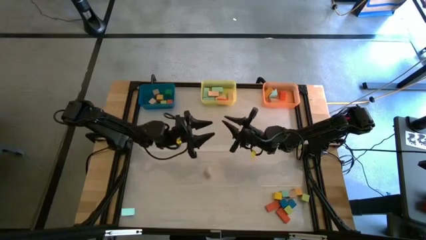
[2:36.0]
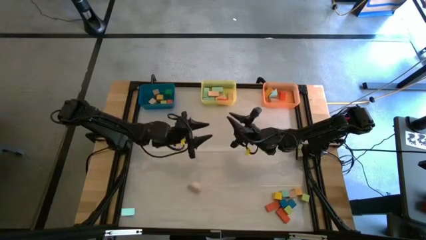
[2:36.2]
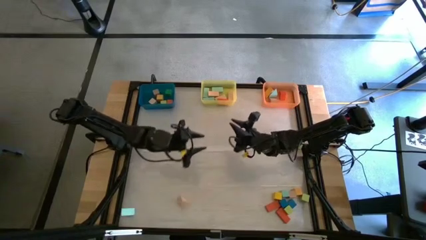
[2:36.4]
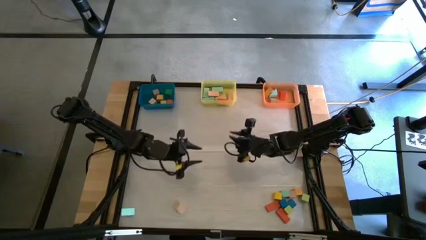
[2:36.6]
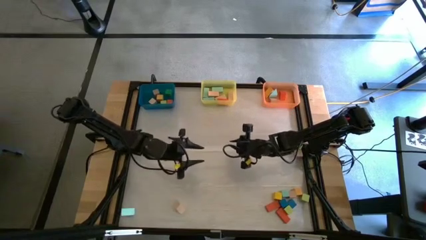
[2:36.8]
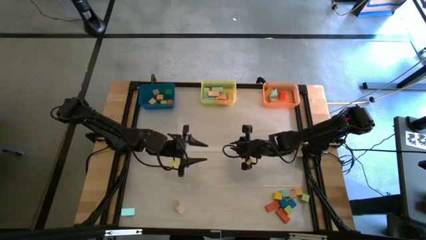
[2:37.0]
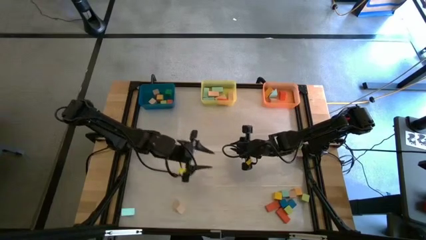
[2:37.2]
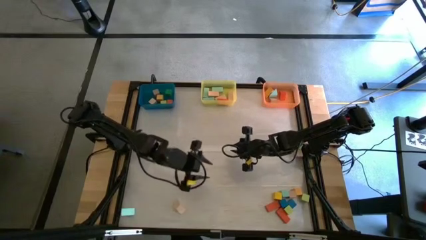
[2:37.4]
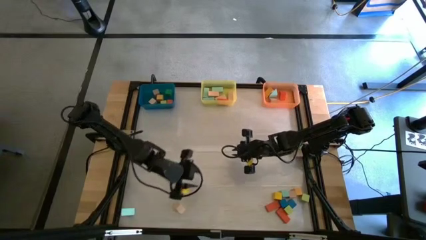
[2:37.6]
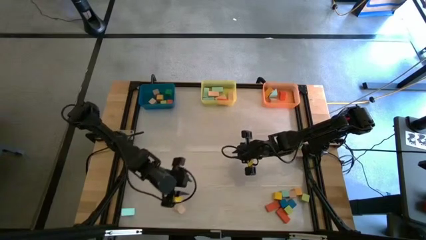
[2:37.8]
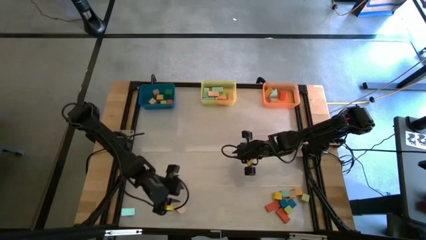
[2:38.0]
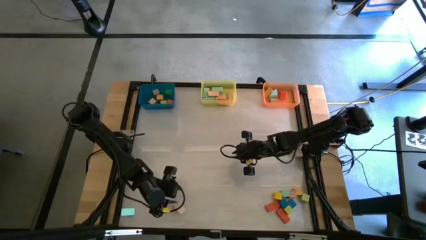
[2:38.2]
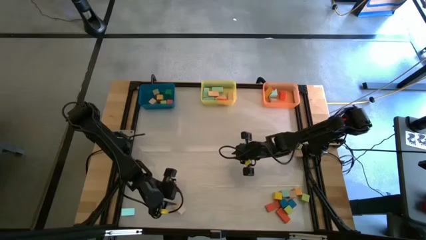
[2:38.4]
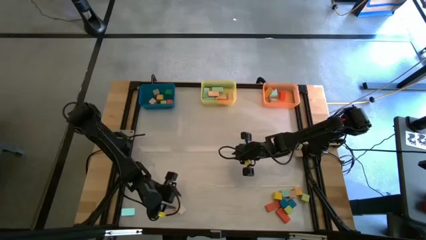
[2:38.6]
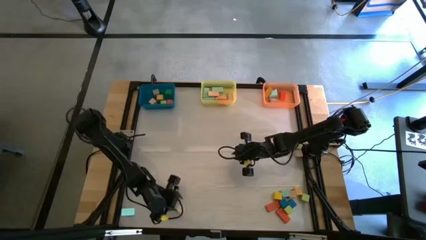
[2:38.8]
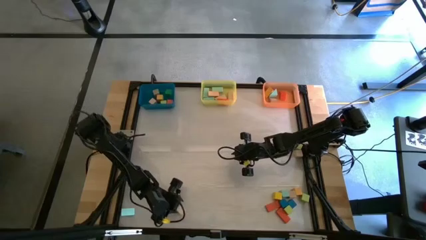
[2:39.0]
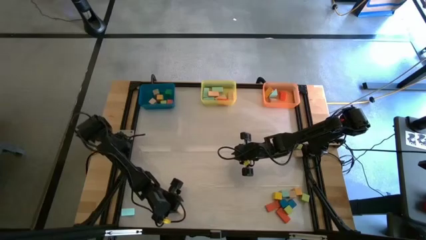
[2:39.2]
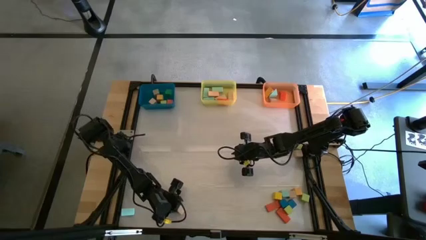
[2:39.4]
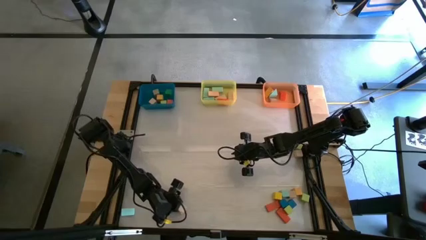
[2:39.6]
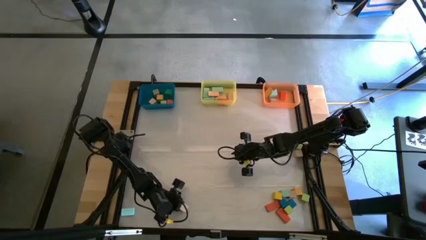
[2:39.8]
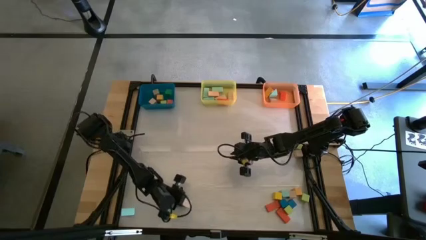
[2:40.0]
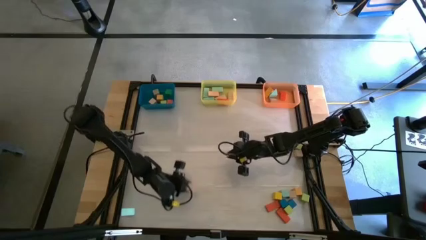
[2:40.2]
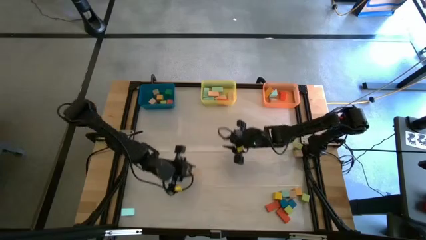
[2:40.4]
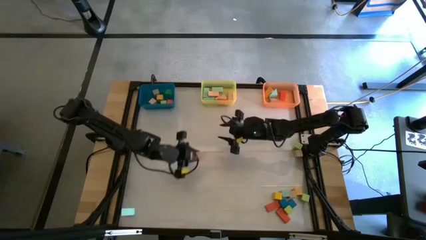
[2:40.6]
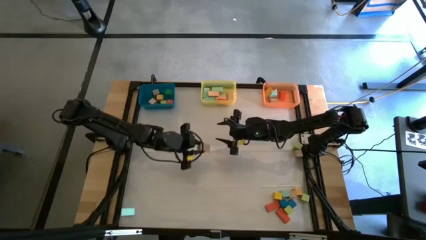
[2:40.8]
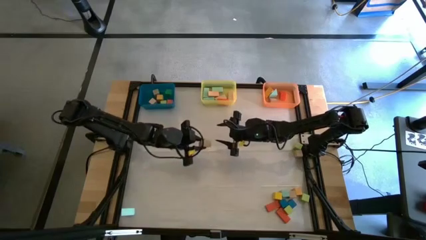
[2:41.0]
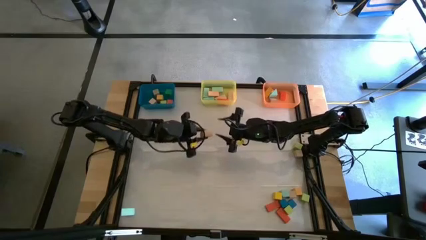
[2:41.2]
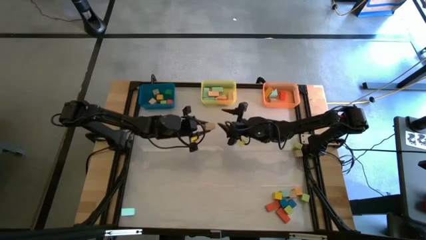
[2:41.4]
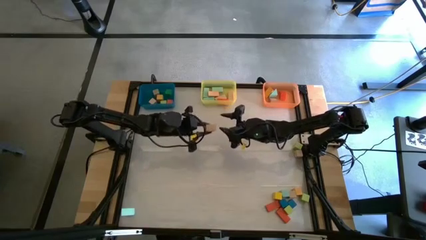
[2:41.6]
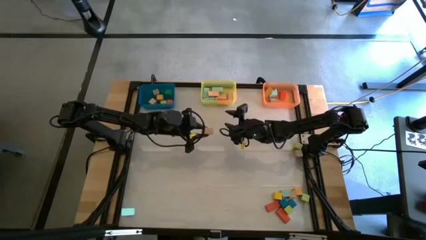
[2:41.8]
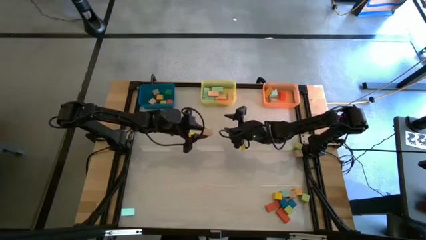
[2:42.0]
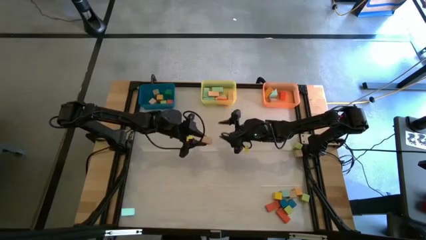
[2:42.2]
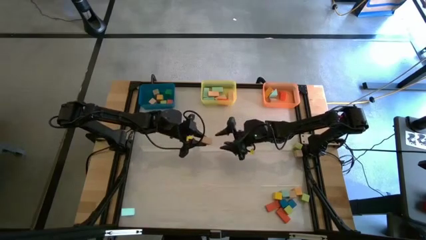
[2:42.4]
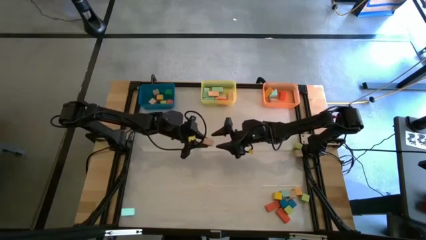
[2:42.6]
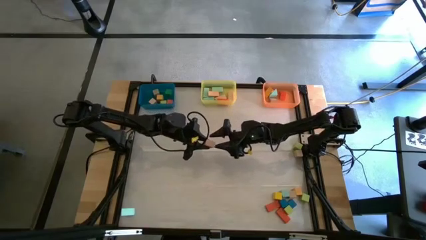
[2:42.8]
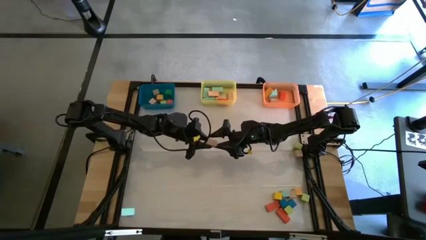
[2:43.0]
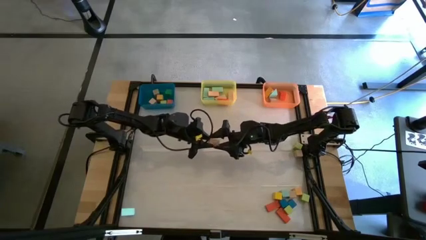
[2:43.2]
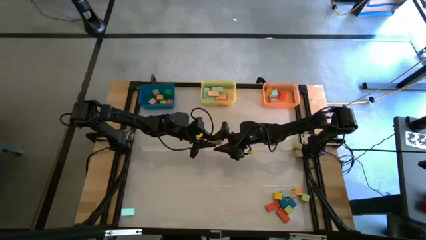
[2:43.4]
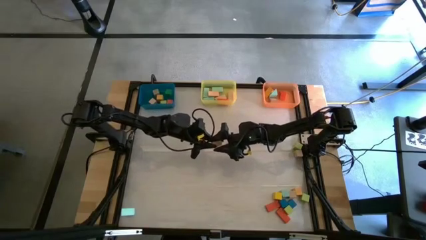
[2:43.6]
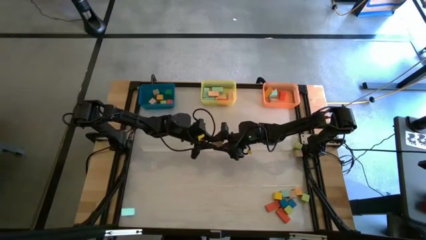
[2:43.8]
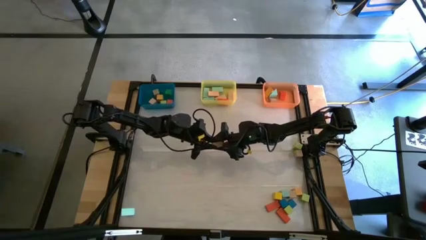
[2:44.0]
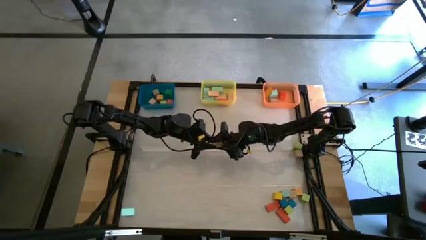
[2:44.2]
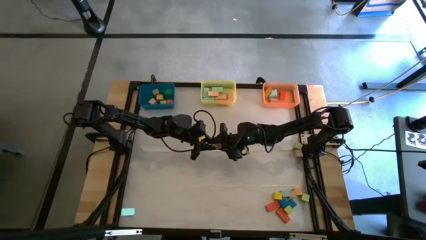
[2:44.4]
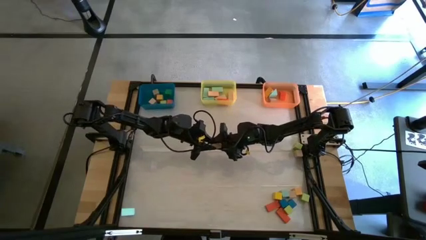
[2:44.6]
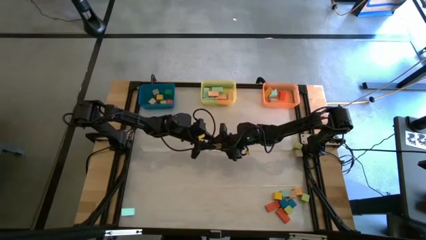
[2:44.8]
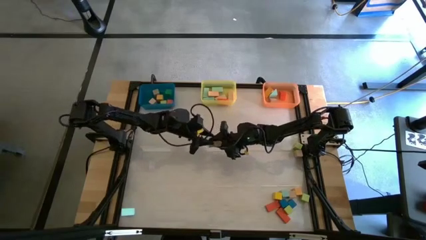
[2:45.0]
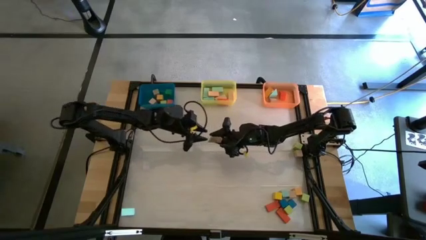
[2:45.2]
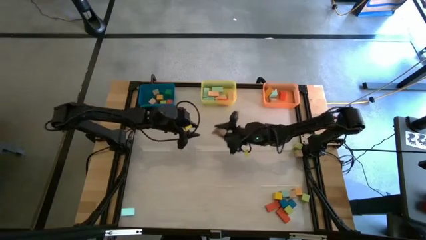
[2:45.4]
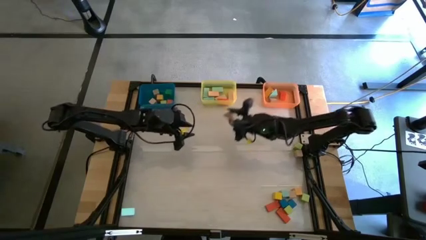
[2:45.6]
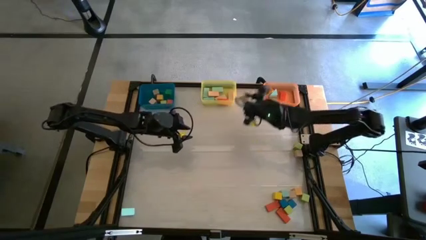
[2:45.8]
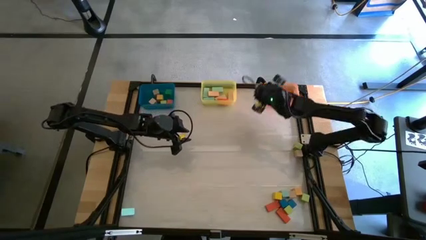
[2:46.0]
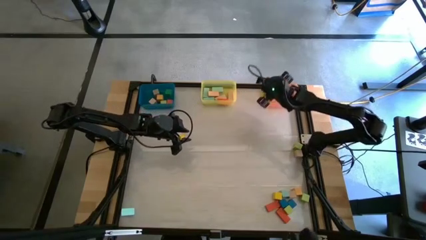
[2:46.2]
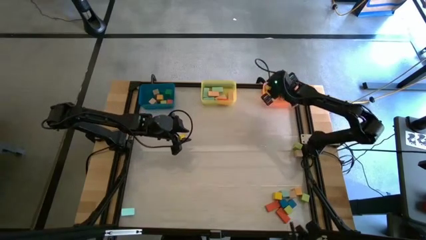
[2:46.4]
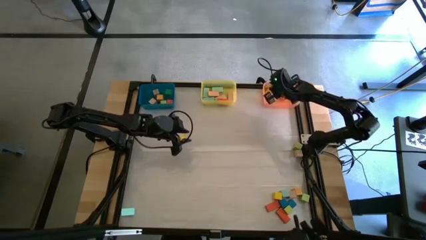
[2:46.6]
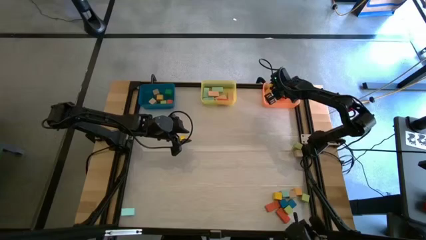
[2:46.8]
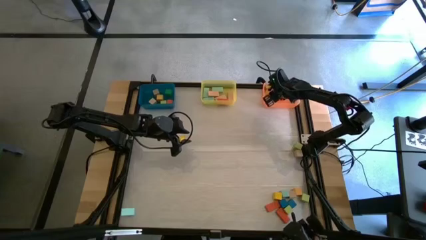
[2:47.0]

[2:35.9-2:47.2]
Task: Sort blocks by size
Put the brown triangle block into the orange bin

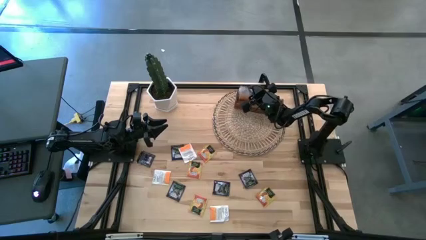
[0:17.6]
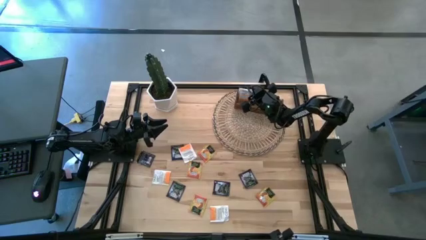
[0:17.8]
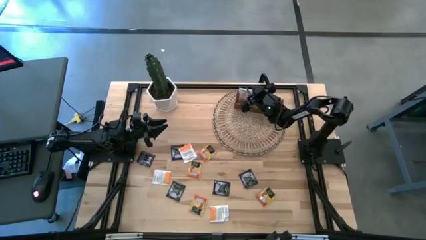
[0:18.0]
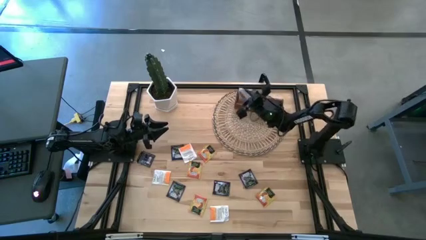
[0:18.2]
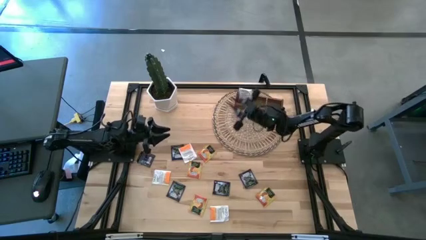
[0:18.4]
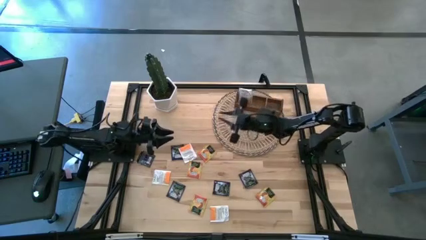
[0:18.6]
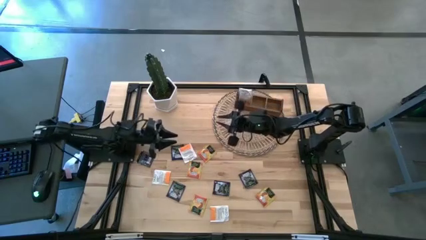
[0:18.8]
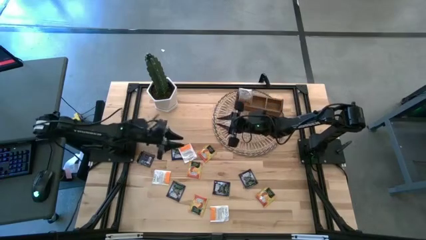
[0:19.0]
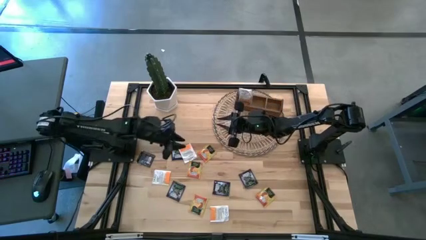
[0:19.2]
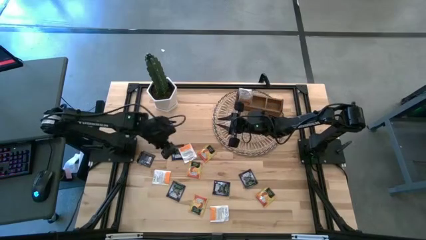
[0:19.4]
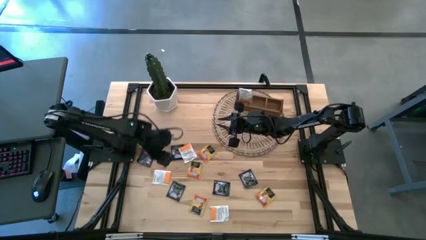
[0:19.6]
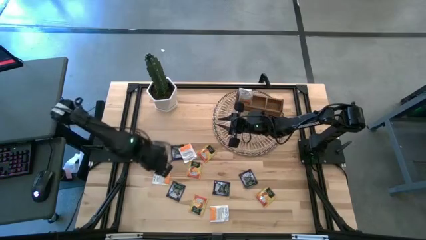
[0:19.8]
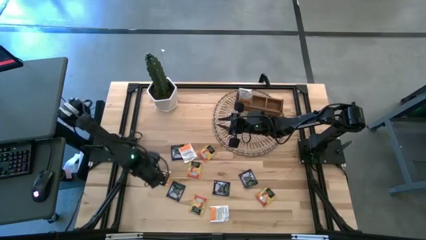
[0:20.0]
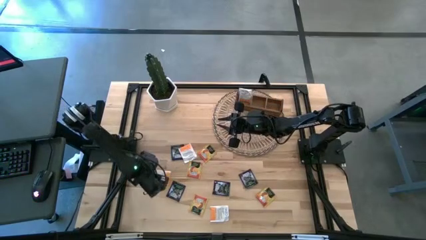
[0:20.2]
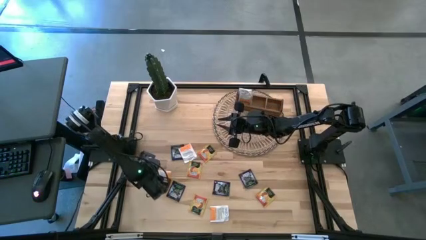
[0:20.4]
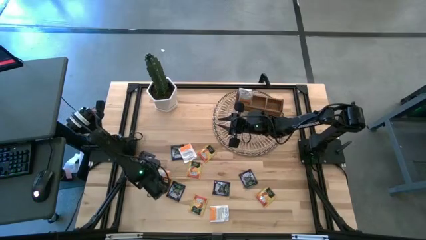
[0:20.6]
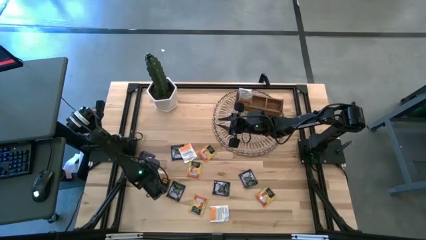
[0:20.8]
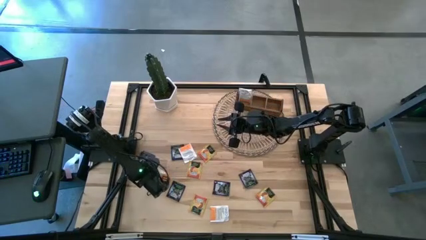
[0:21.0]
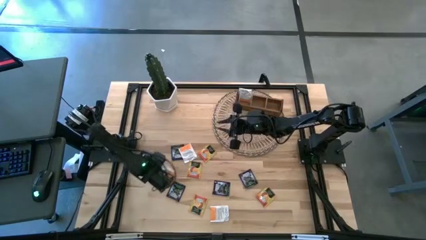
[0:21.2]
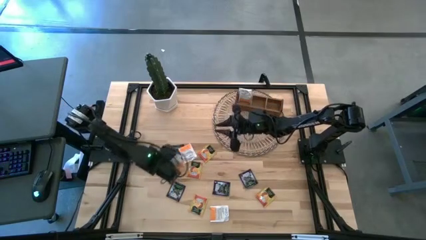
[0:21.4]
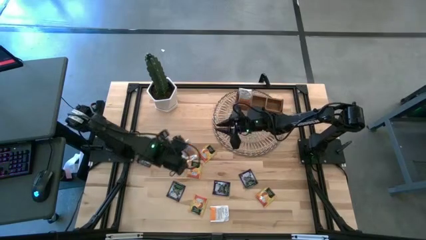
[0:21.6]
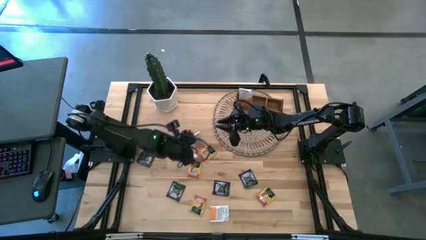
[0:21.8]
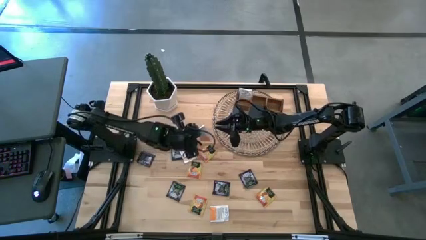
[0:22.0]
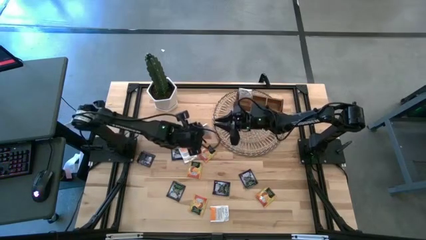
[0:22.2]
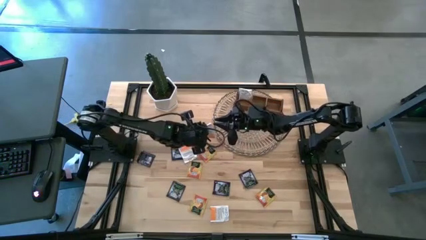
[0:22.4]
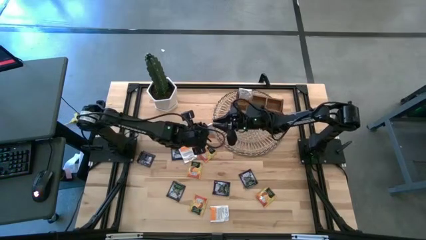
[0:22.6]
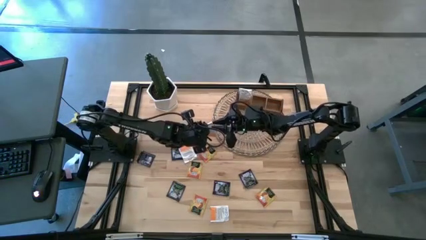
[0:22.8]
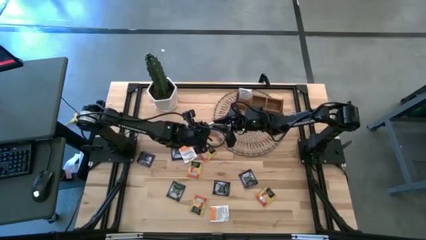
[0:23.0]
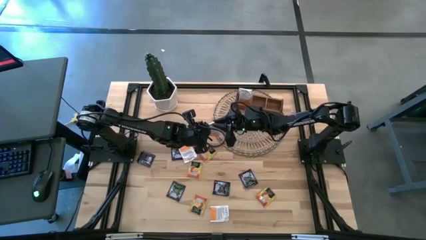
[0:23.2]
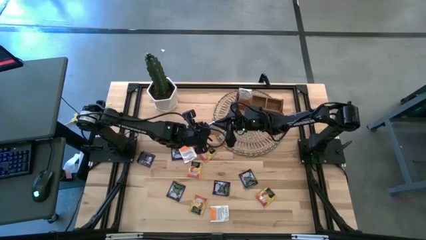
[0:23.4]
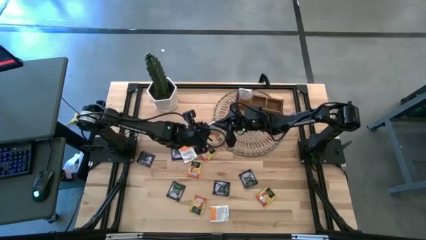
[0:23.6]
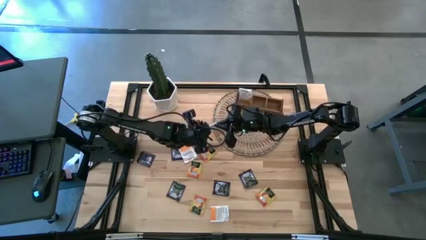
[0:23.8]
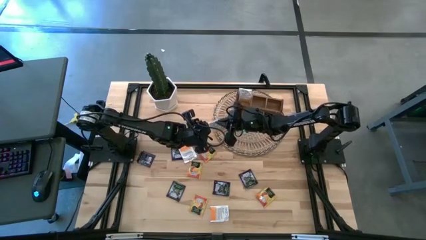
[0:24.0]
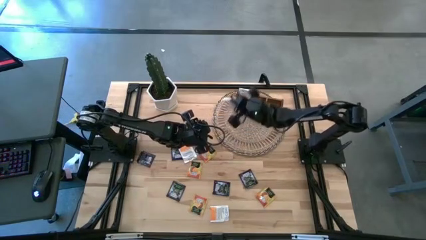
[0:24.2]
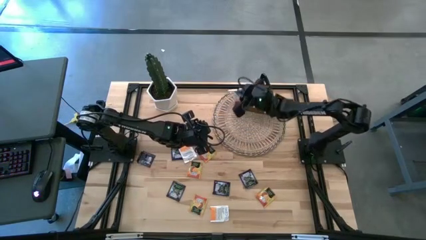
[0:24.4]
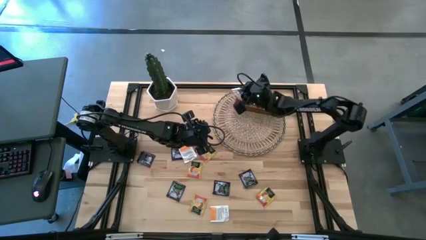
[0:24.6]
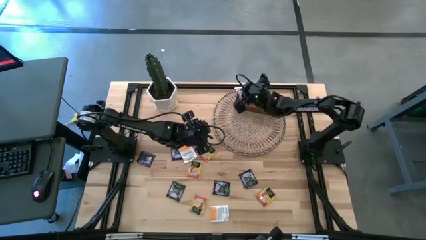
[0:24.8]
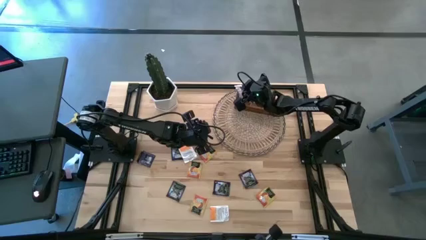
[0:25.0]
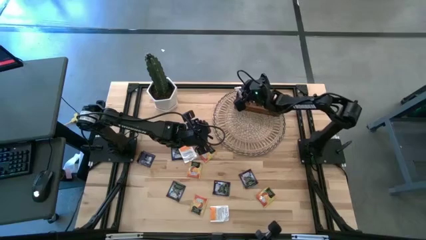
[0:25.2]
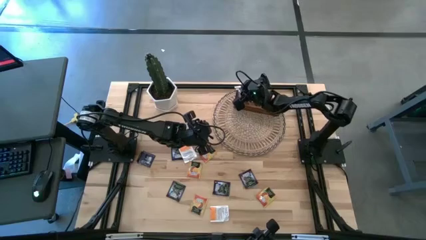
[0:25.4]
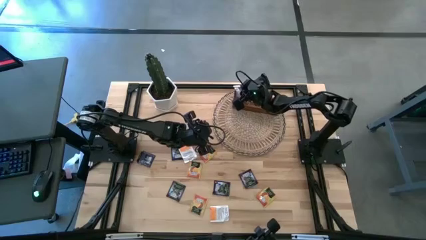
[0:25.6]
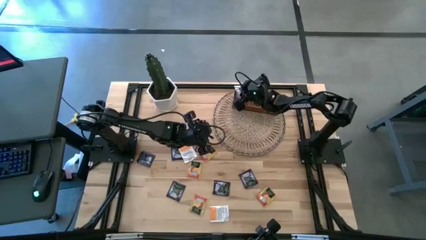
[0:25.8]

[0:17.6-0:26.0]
Task: Pick & Place Tea
Put the orange tea bag into the left section of the wooden organizer
